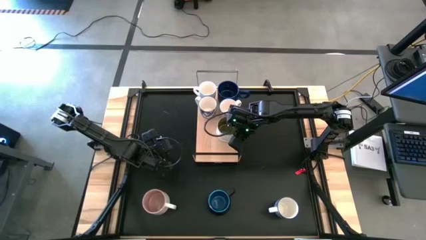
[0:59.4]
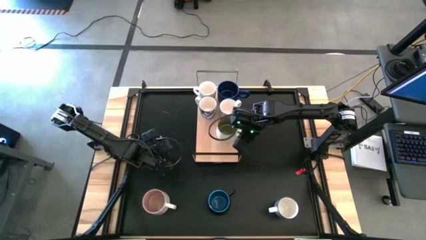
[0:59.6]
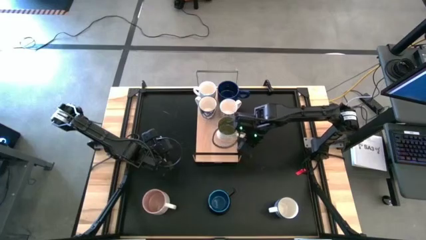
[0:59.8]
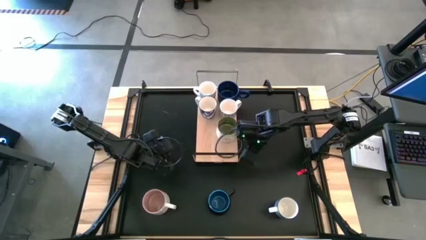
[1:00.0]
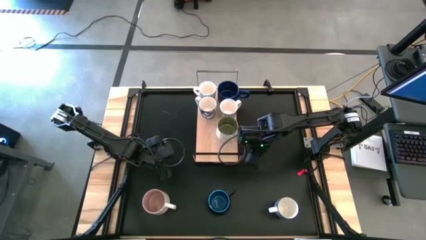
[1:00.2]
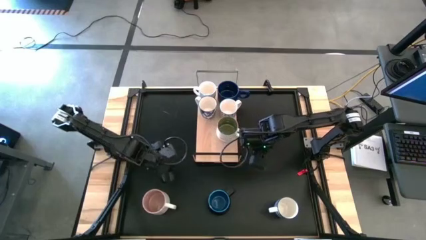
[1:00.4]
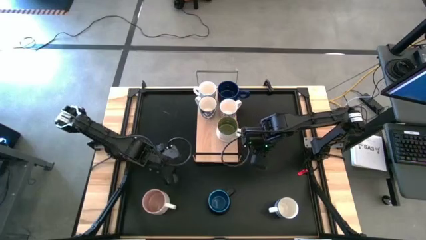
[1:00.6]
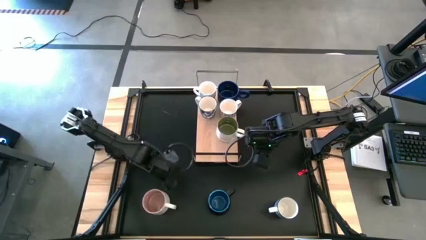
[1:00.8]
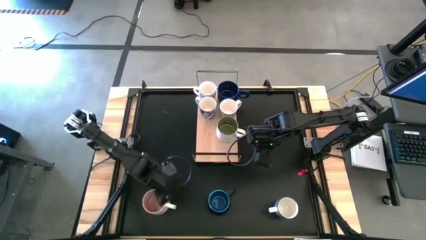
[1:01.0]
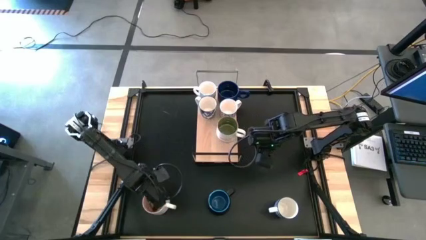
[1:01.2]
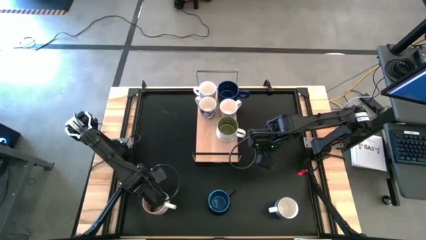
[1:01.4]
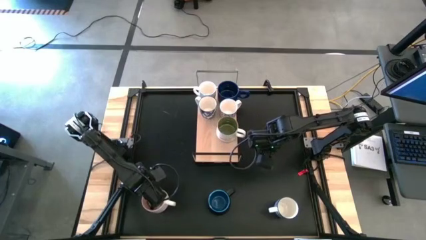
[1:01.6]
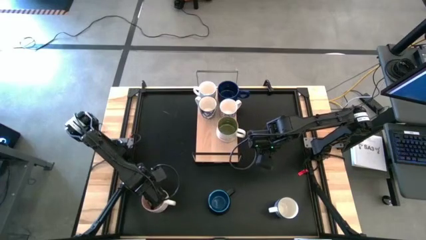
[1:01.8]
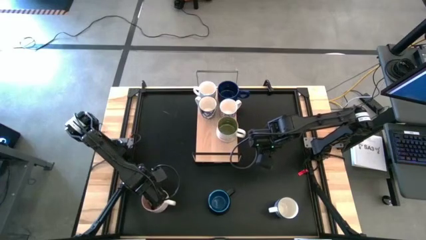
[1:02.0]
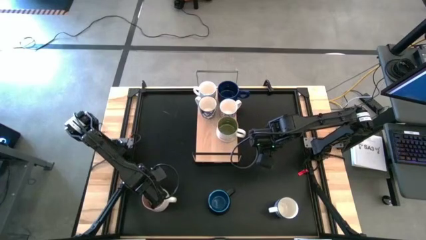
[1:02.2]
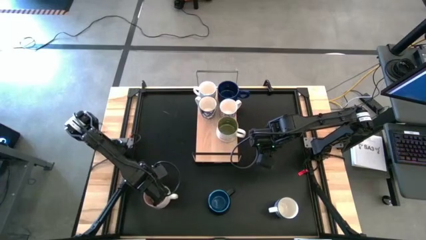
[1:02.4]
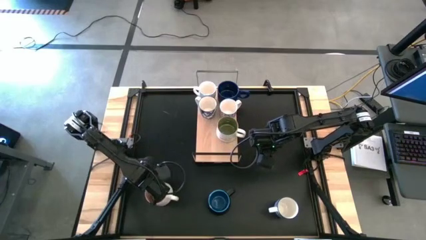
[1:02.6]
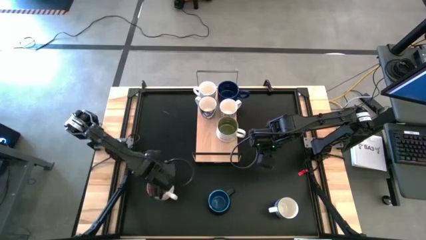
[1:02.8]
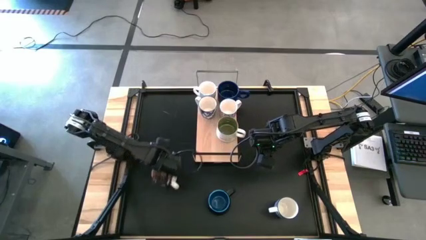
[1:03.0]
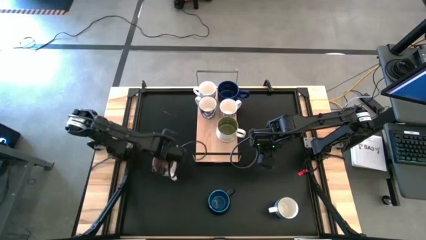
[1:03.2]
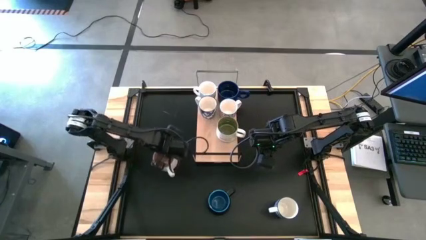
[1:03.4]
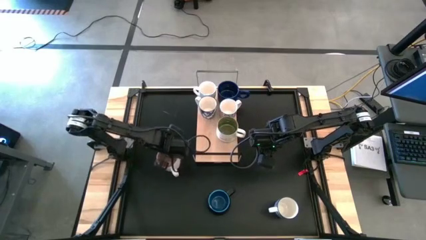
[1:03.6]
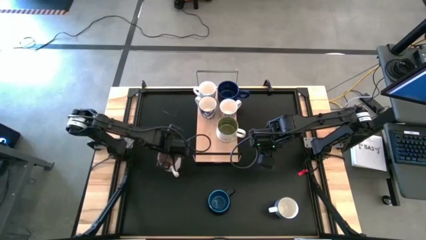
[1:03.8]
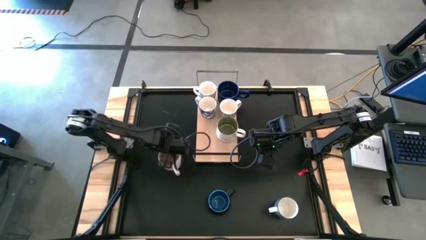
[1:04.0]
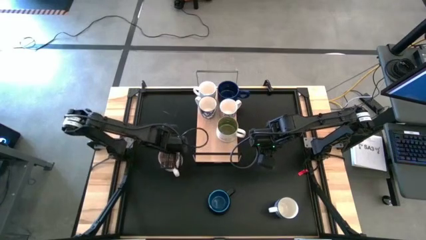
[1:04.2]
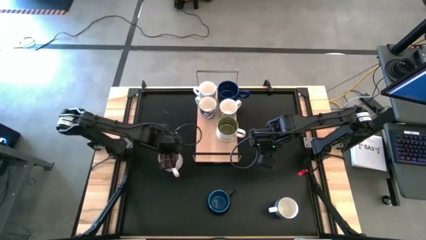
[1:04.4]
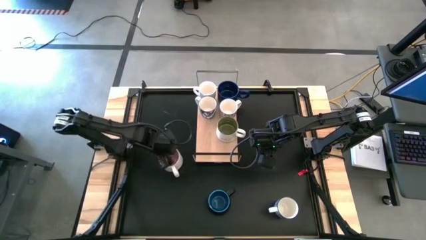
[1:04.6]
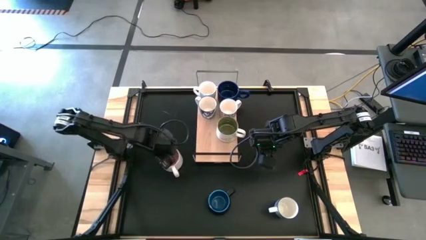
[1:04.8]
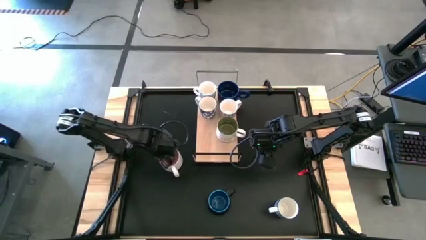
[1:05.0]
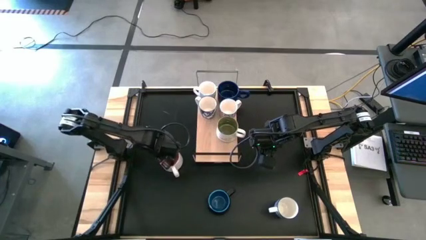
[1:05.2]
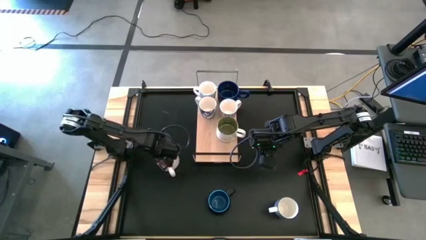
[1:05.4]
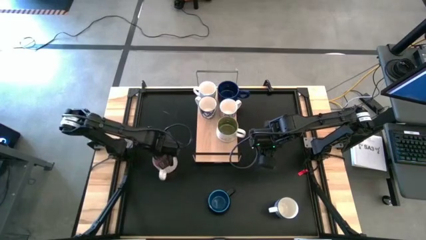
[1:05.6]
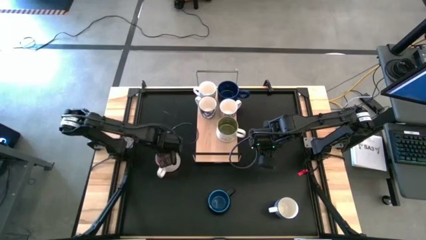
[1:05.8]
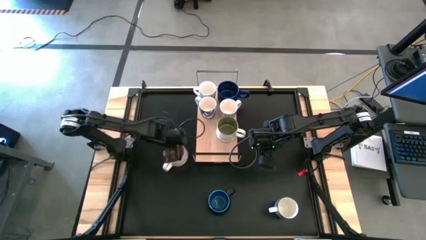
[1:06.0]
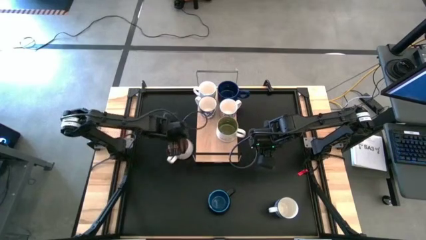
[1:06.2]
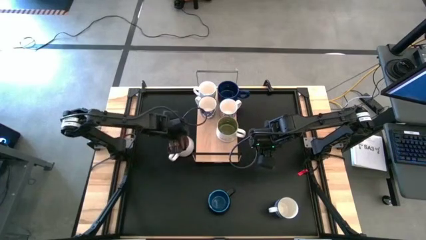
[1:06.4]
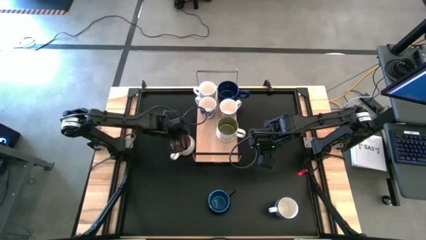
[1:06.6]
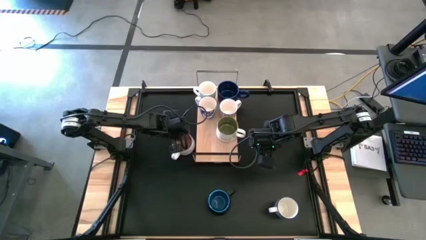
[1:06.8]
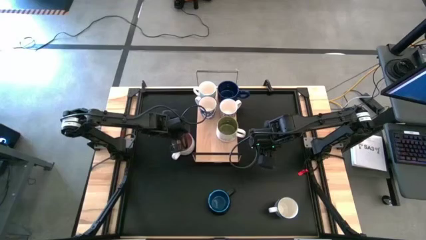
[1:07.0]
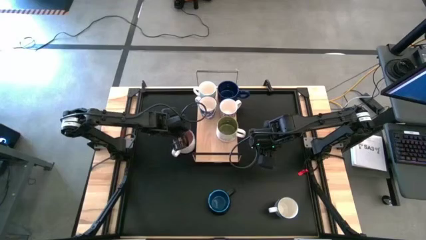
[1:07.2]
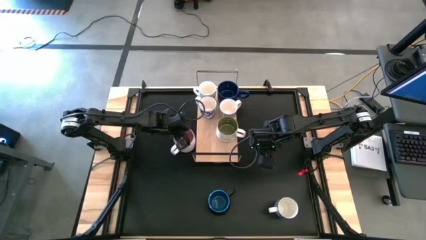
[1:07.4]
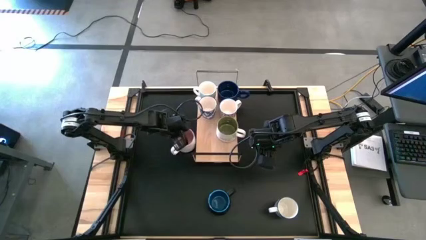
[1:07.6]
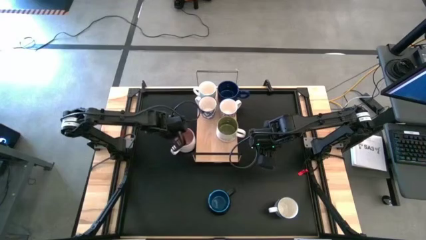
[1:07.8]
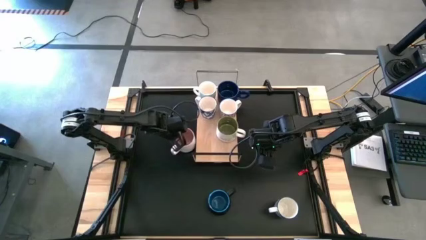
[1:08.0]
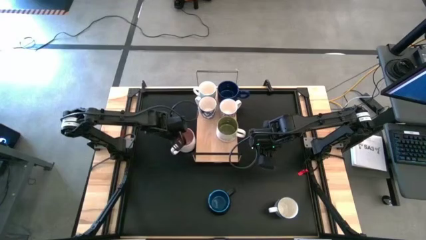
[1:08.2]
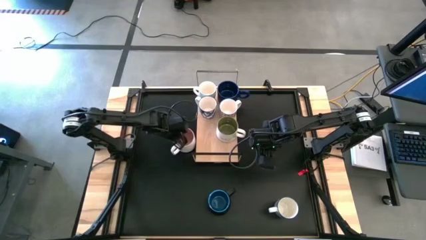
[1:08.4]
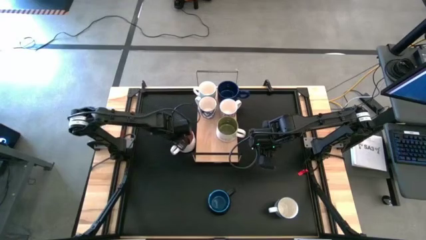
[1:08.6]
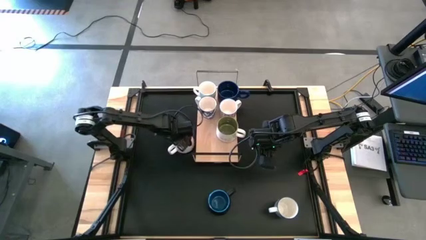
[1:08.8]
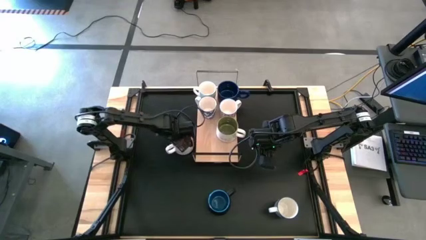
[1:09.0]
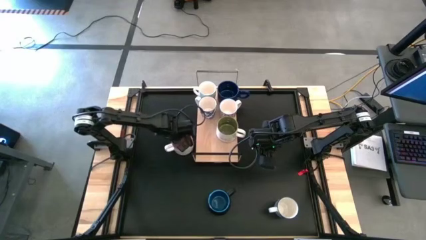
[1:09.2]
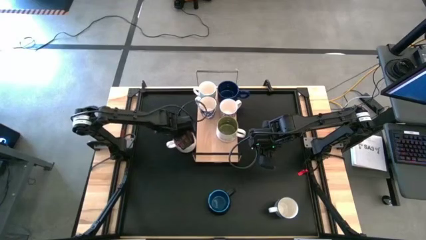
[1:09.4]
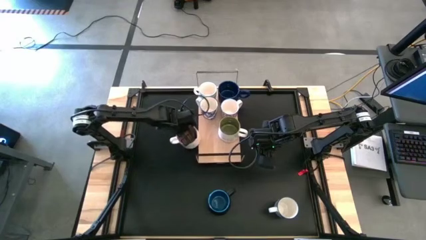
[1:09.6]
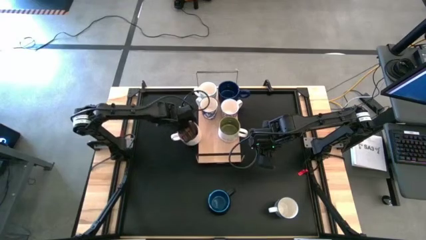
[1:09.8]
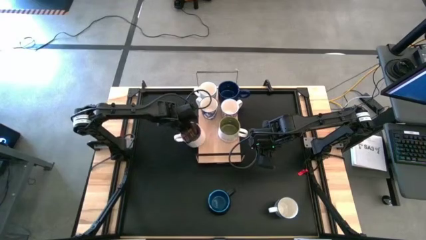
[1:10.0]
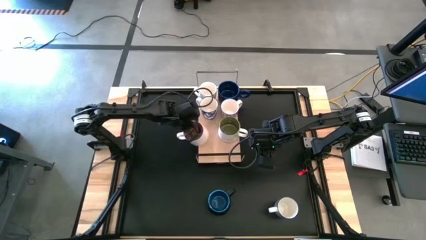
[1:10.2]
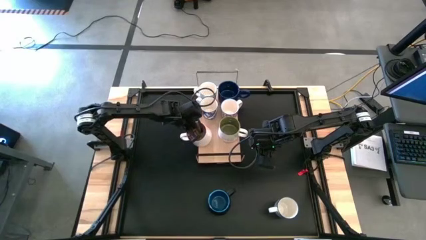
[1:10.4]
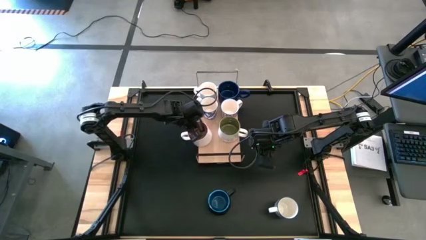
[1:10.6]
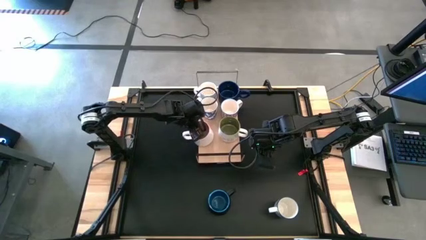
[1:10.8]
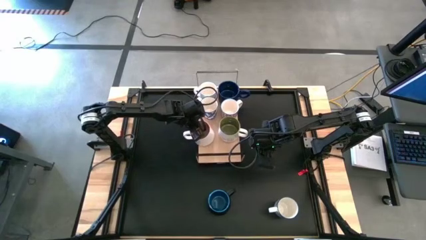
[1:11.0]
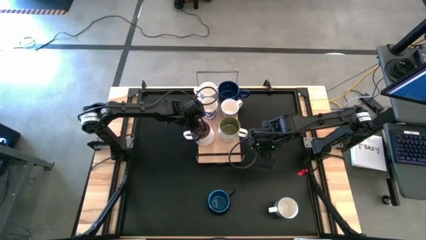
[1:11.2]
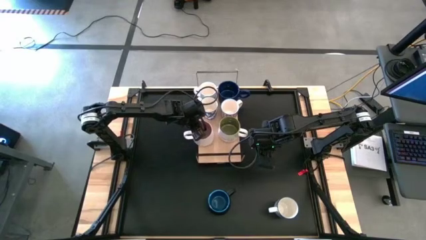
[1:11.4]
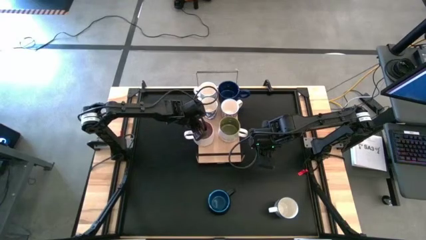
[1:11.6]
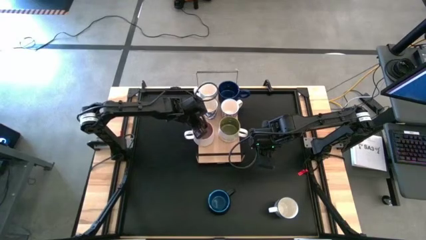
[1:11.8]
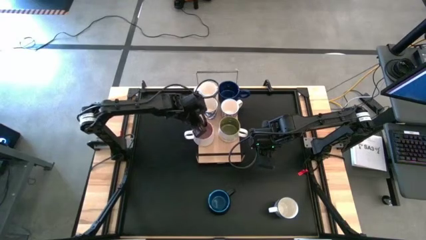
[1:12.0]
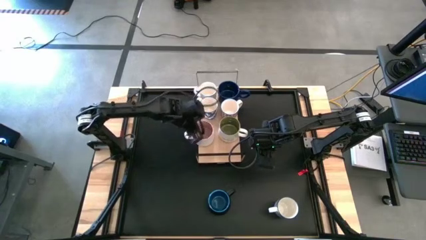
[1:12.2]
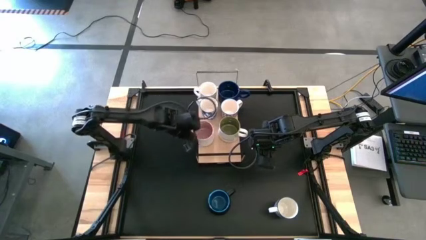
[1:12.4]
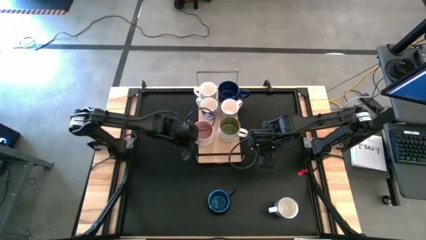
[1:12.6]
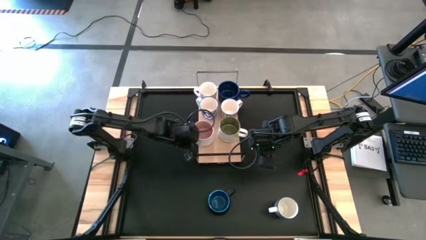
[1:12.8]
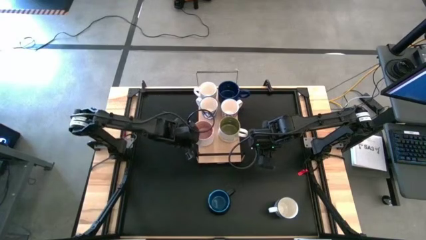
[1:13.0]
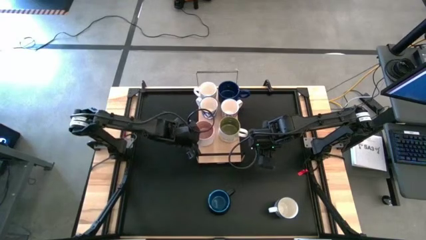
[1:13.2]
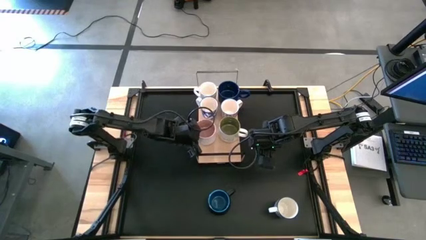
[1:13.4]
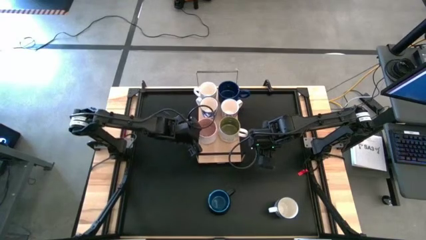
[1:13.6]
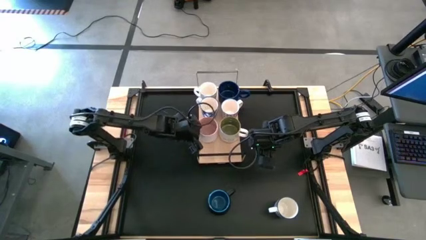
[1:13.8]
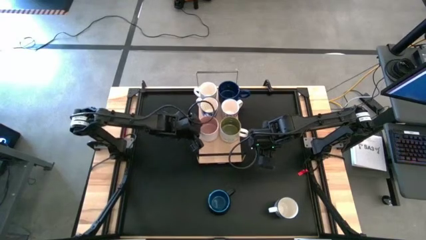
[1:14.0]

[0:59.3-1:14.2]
Task: Place coffee mugs
Put the pink mug on the shelf

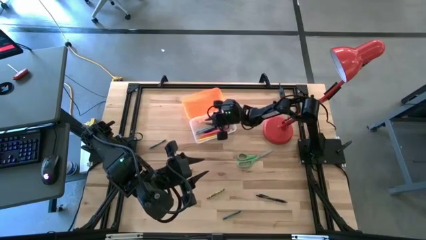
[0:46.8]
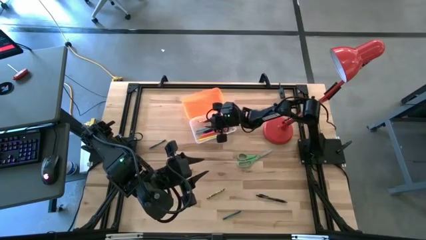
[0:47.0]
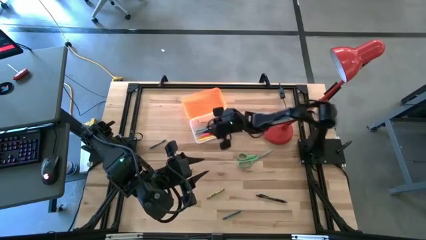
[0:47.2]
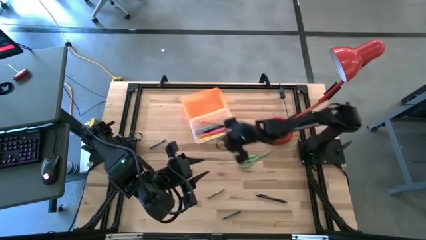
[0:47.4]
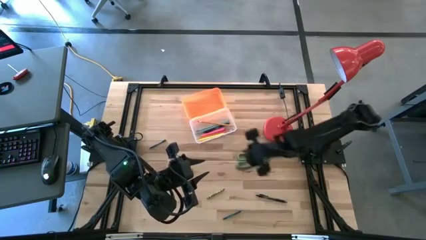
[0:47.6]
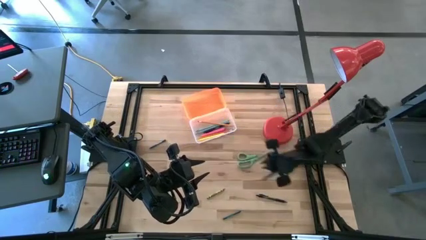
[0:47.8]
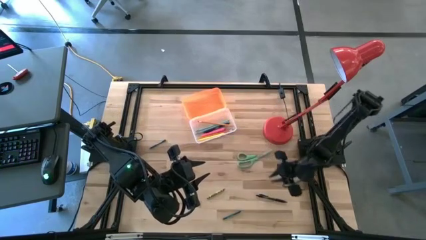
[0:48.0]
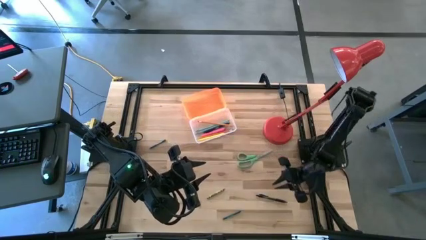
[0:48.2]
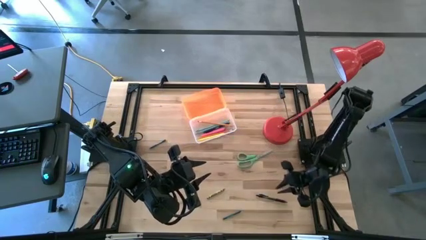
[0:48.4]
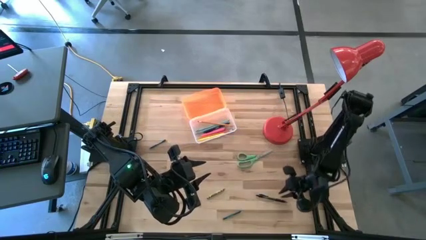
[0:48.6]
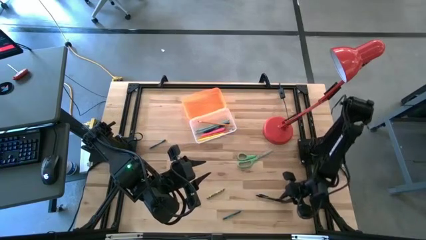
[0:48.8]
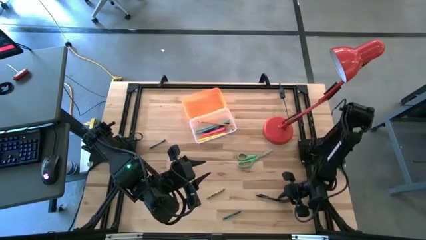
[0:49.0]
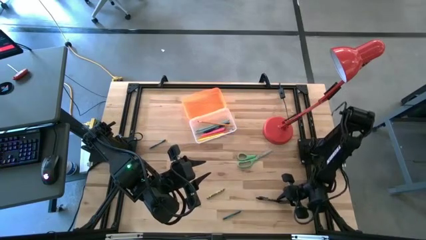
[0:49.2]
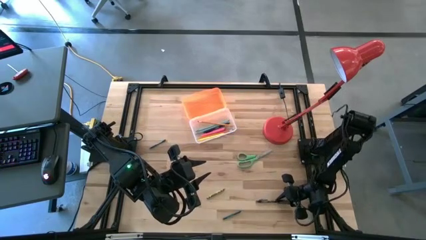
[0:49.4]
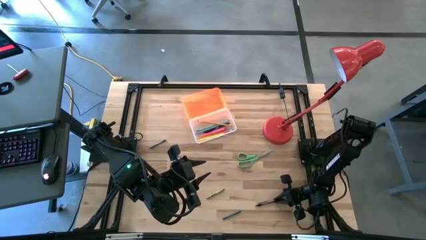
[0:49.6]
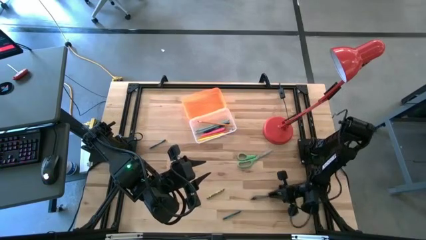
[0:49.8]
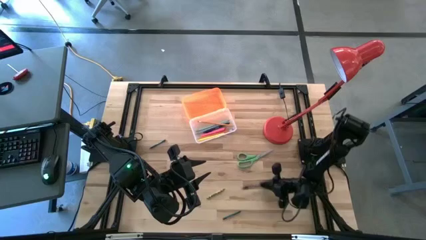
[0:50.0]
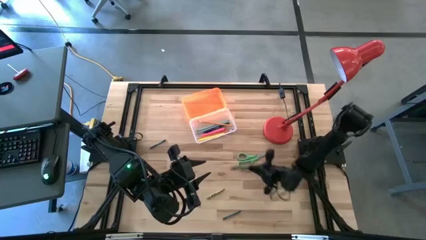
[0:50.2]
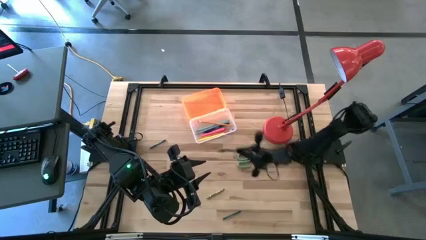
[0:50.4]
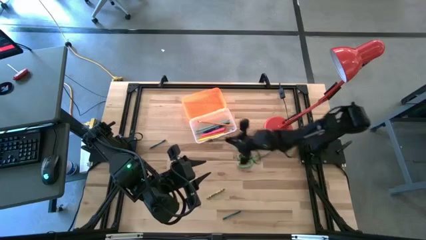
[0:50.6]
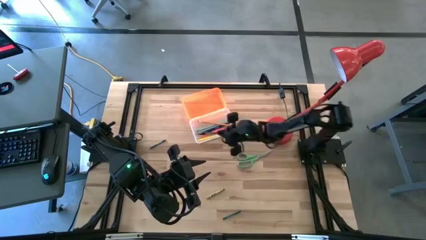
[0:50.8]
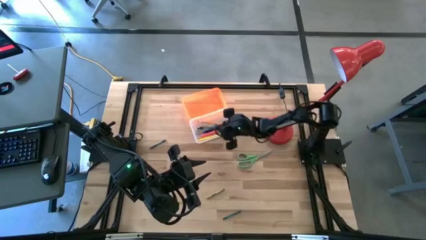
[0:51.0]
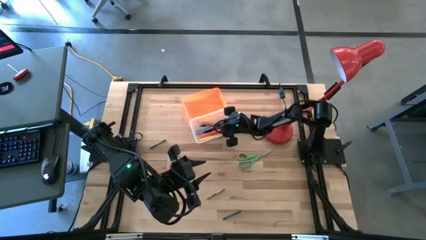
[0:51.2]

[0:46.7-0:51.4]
Task: Pick & place school supplies into a supply box
Put the black pen into the orange supply box
